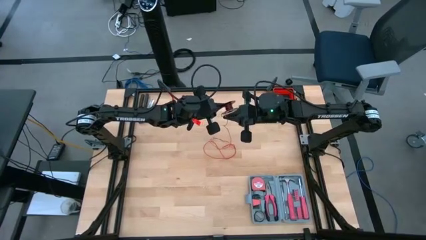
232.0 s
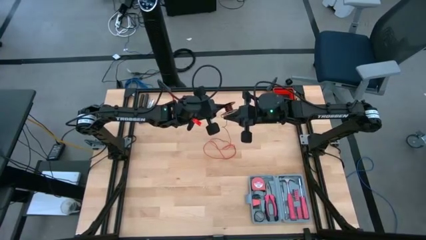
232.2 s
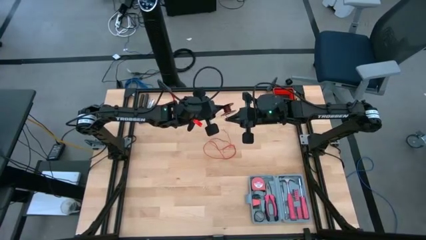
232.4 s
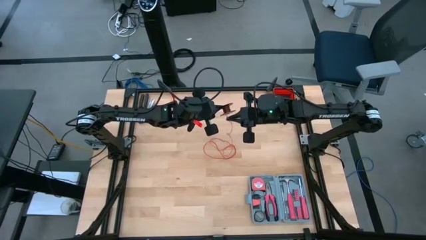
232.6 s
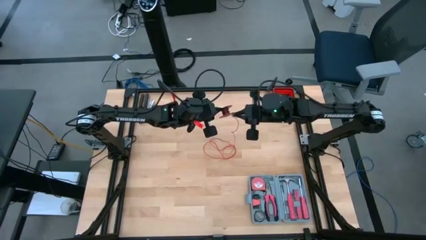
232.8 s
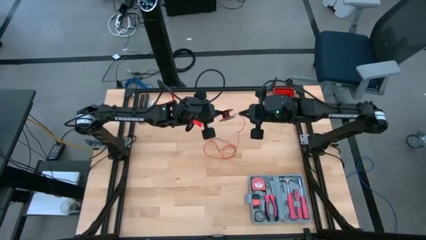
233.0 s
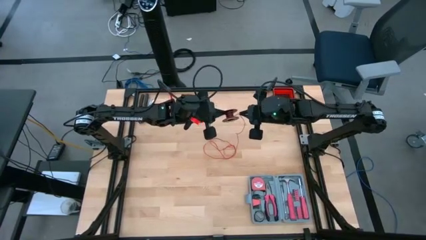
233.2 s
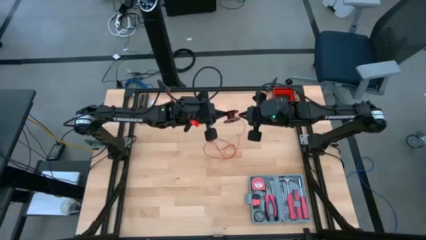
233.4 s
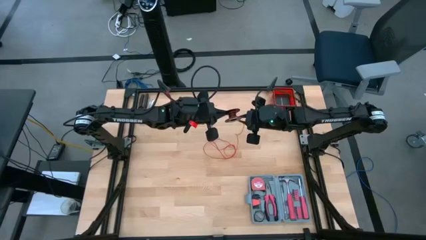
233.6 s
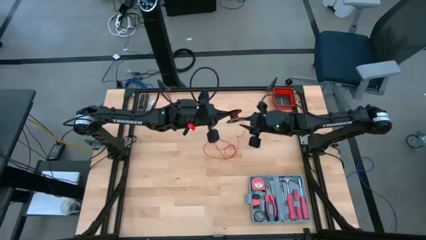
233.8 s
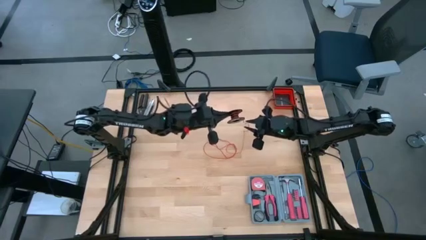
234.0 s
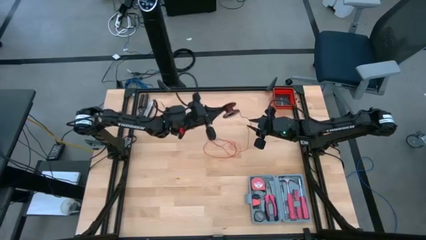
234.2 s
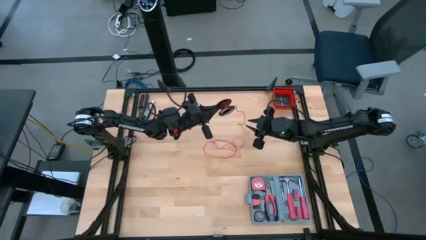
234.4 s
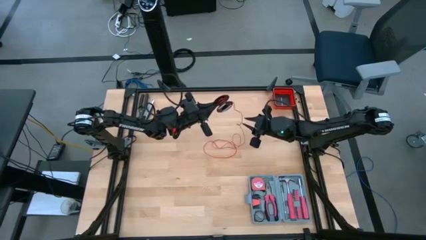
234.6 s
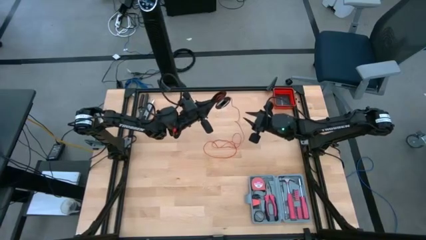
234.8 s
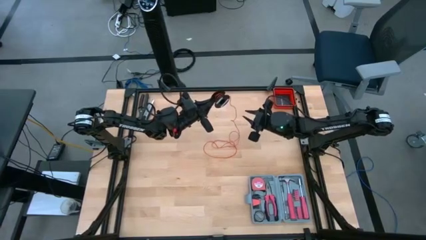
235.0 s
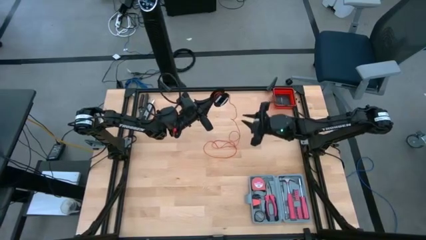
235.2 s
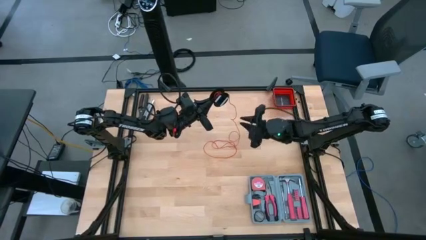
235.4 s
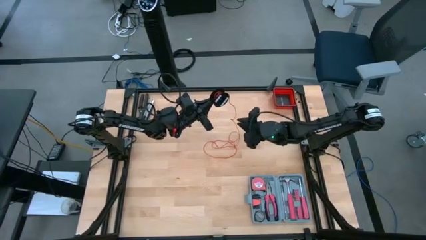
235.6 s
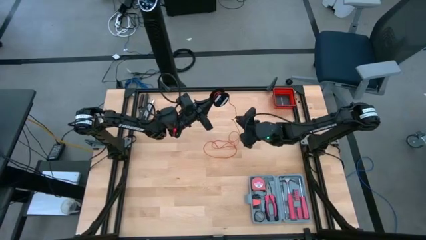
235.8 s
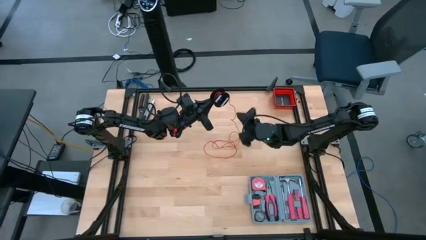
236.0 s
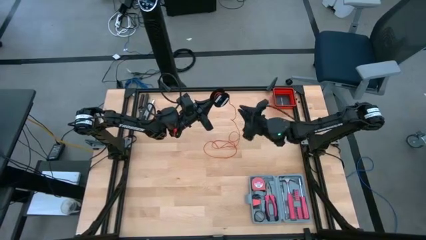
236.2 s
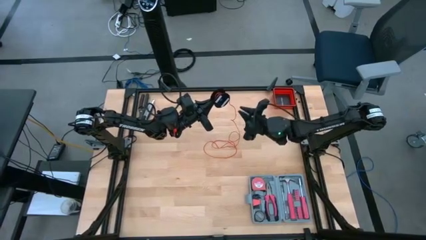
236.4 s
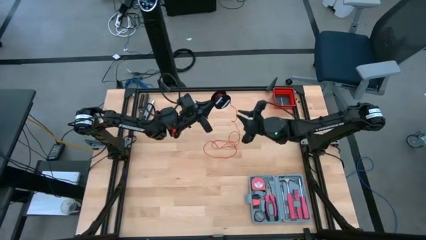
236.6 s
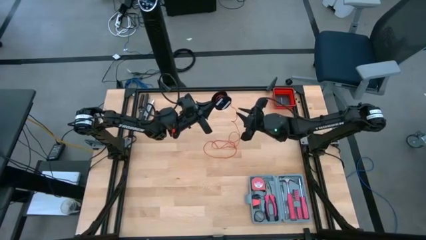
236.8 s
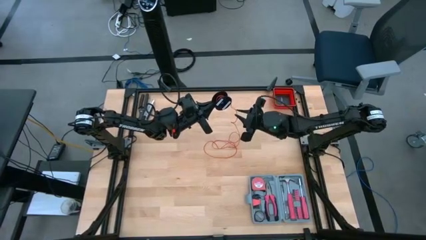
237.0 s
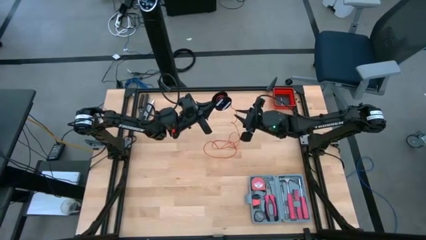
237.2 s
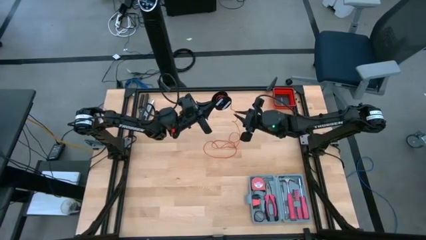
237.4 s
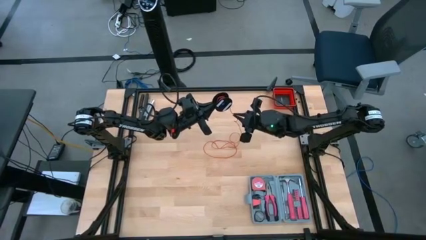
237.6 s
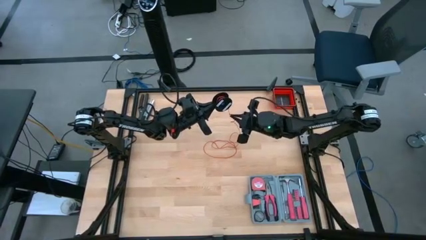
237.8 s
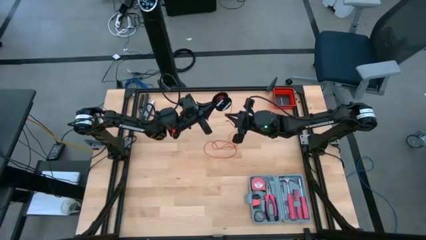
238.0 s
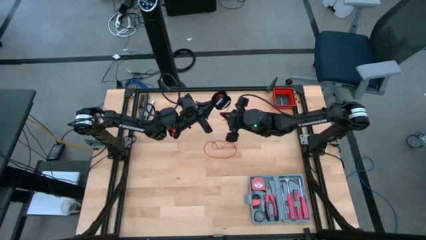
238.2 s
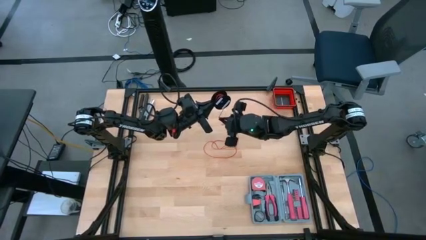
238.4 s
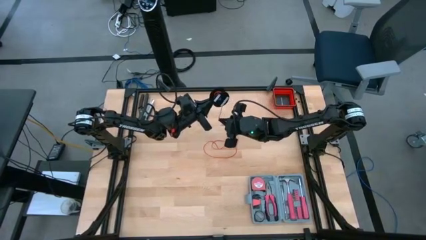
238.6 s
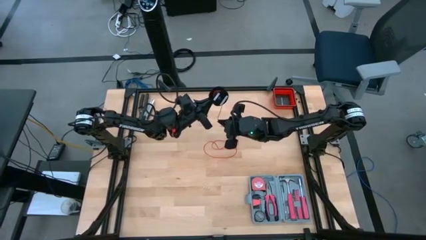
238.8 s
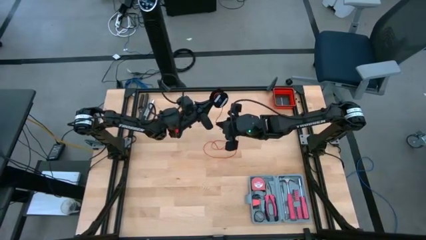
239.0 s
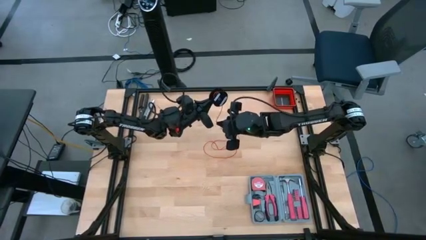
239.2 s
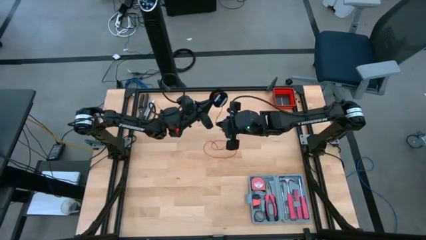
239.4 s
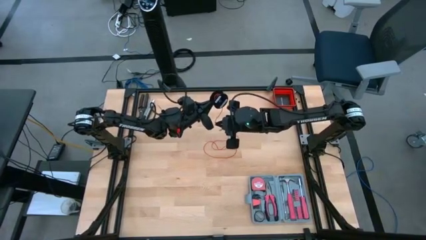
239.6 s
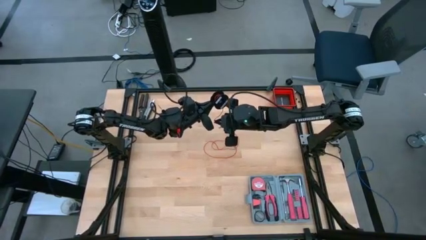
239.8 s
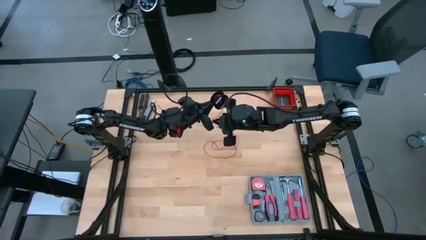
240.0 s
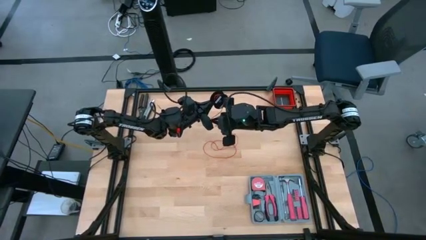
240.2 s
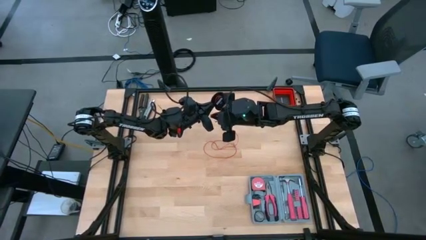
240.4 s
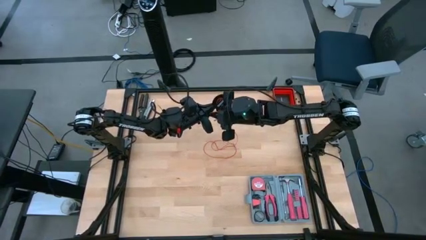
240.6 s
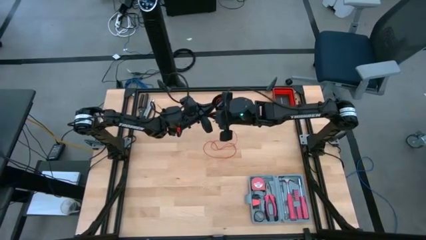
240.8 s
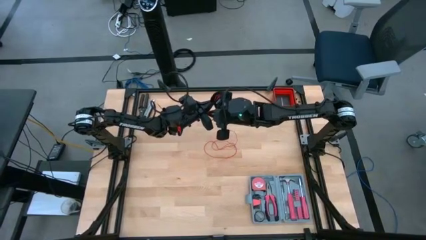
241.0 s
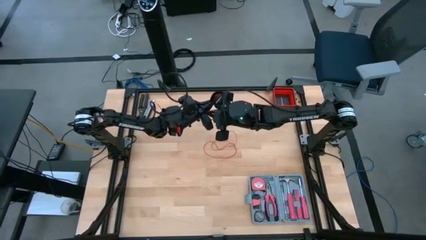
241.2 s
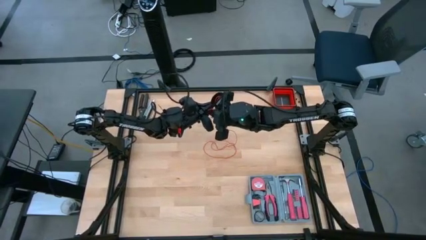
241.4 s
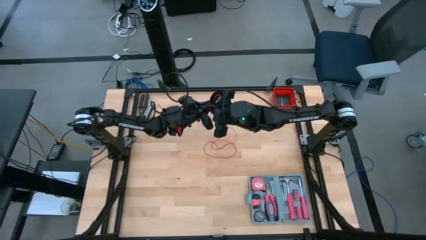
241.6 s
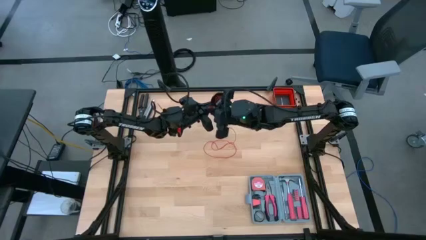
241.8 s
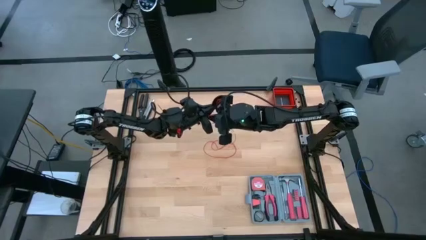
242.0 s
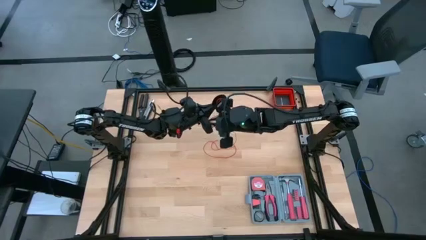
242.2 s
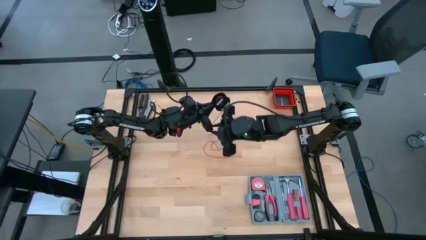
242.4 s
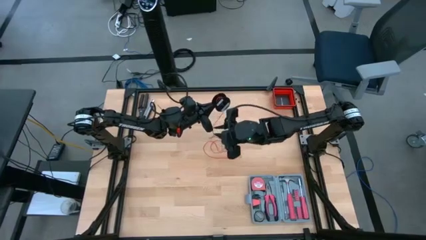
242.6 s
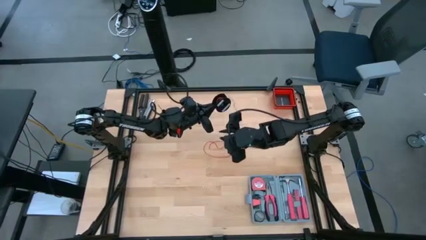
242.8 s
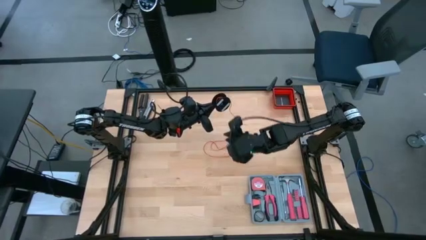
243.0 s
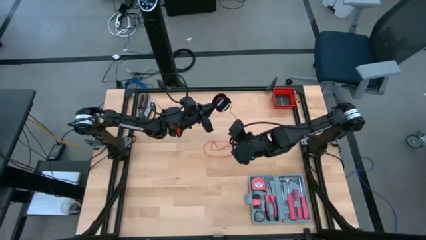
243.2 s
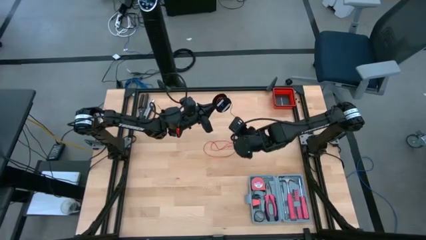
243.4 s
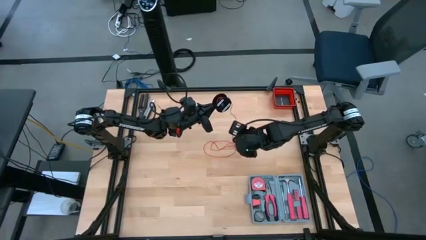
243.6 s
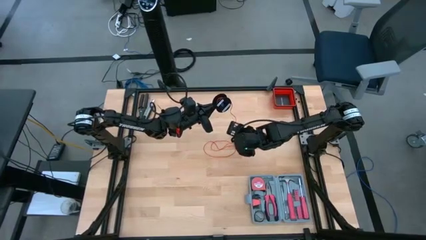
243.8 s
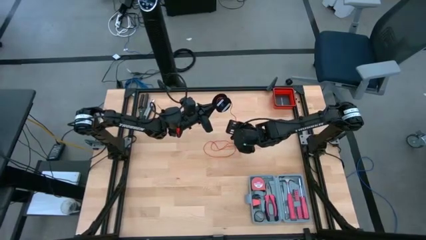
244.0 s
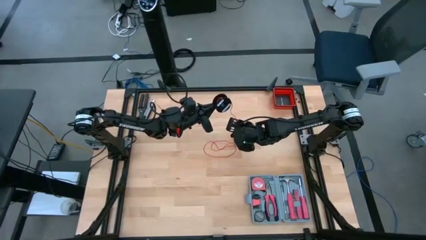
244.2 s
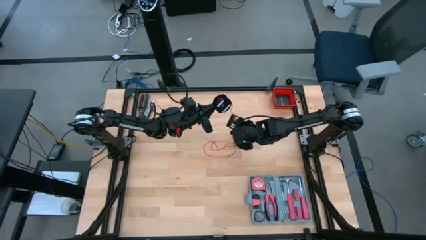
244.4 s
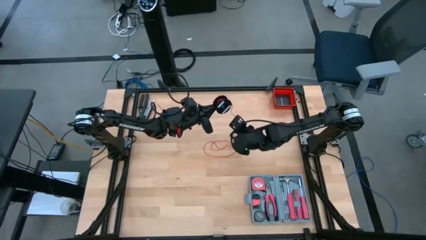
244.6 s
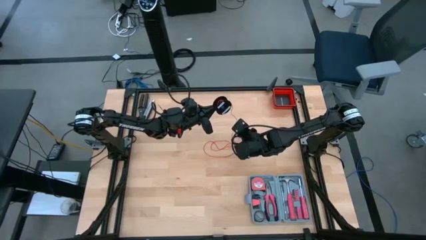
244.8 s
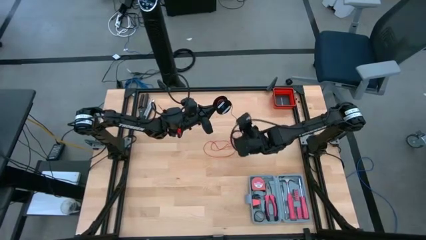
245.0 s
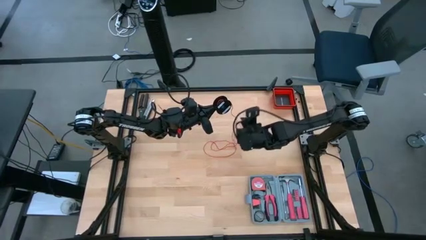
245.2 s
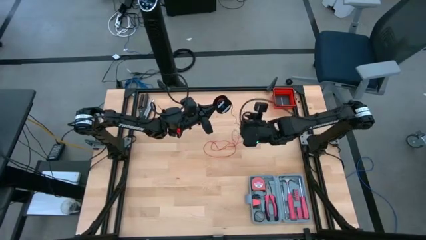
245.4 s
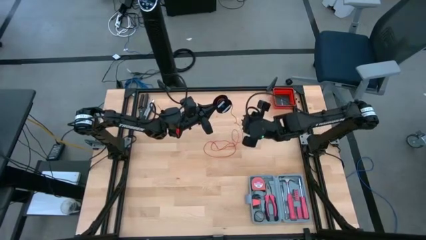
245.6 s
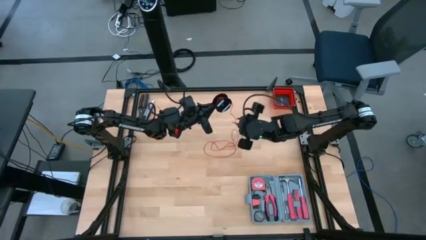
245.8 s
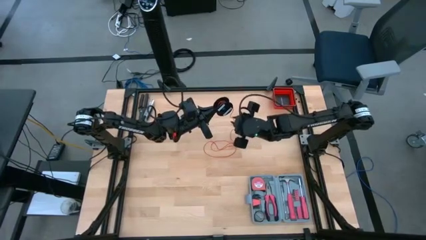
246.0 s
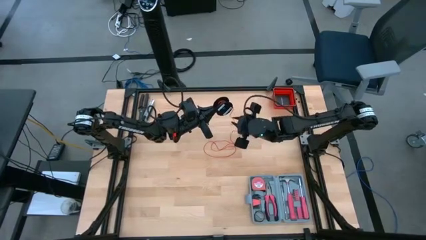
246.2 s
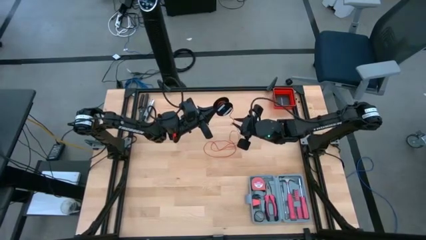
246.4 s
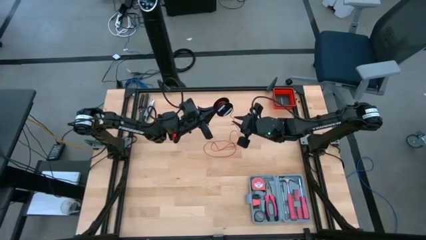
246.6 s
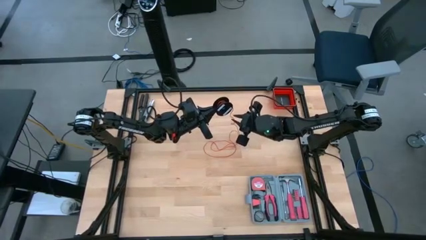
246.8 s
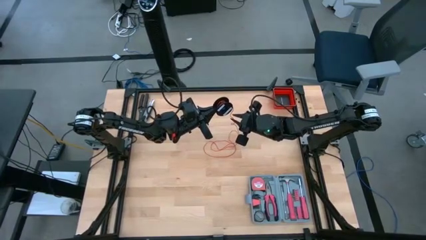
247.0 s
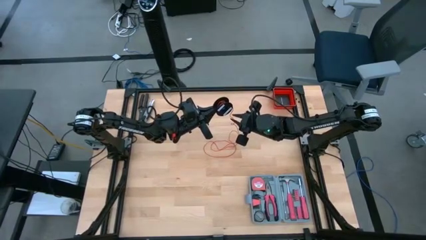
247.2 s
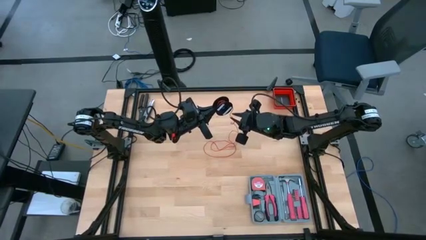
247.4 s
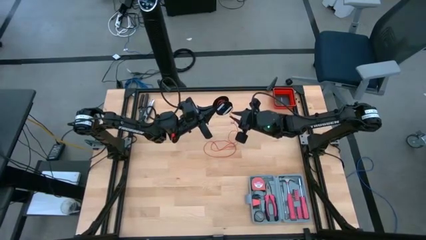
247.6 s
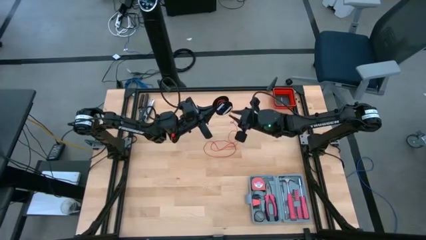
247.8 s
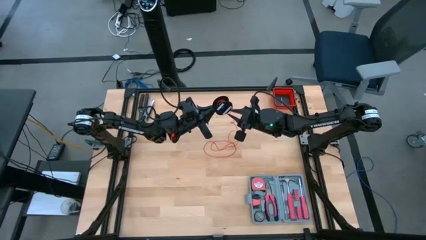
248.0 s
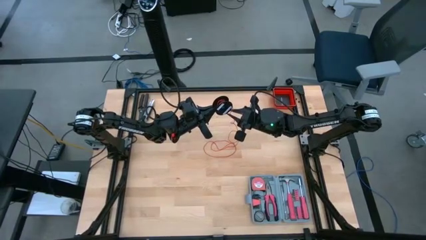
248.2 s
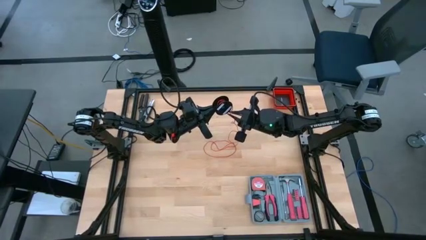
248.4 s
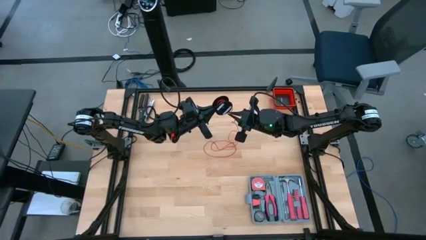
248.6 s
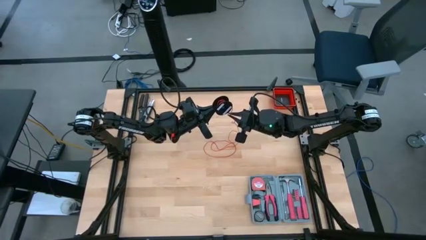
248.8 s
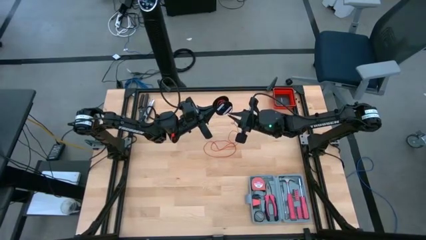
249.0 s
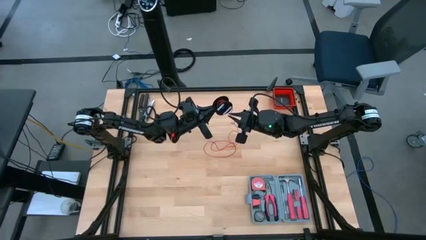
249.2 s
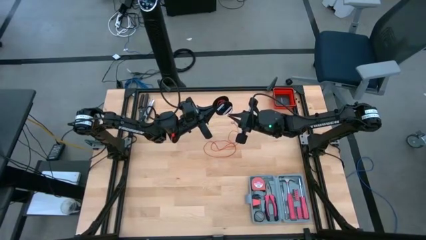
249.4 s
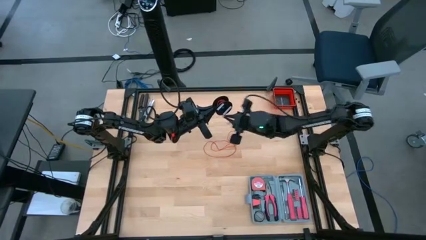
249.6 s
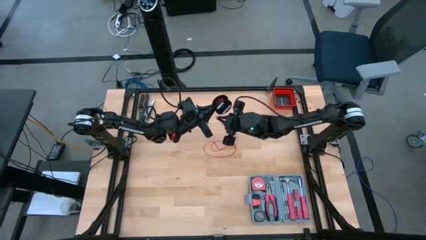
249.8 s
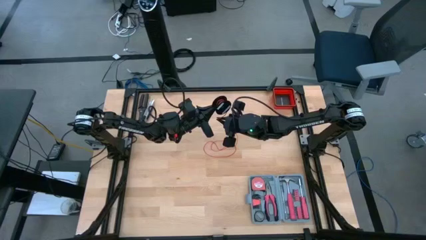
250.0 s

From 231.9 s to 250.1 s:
Task: Coil cords
Coil the wire
